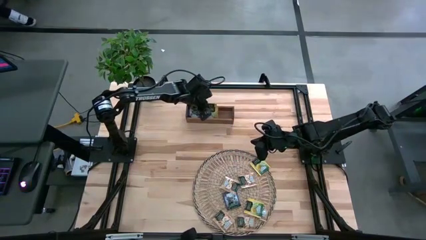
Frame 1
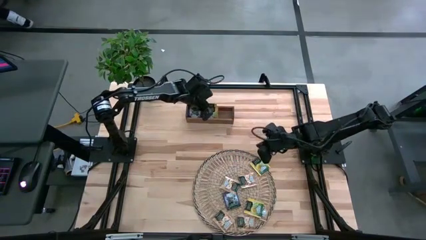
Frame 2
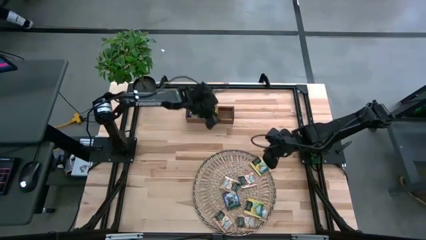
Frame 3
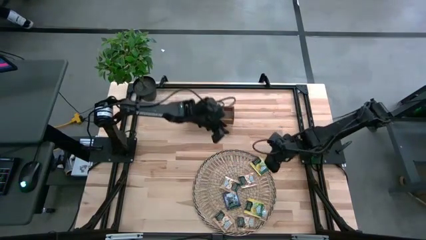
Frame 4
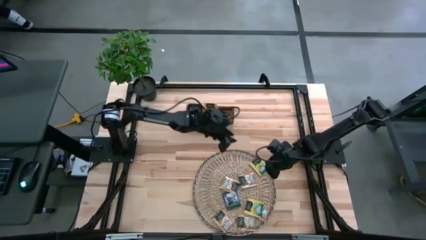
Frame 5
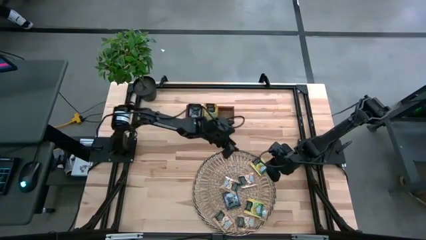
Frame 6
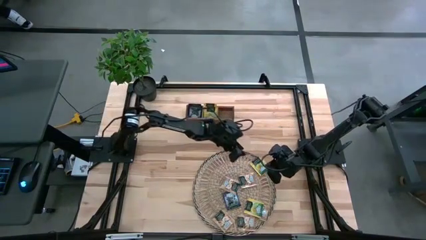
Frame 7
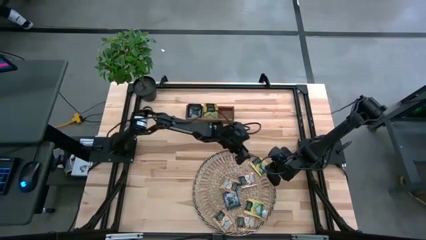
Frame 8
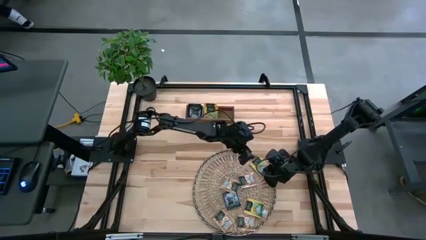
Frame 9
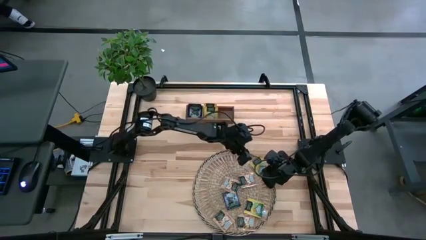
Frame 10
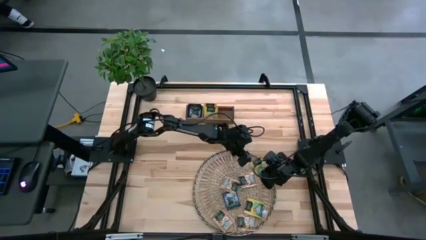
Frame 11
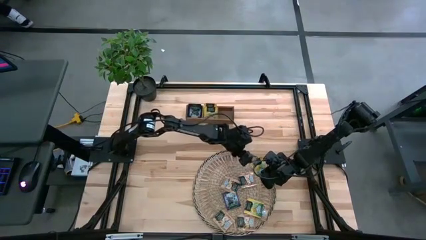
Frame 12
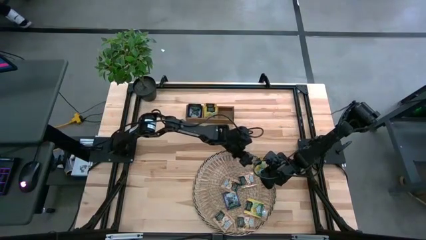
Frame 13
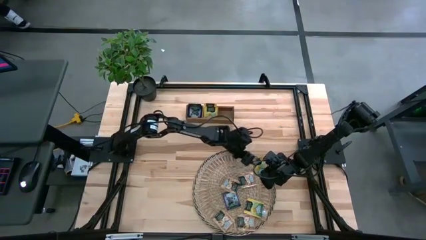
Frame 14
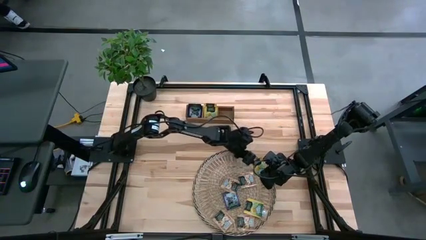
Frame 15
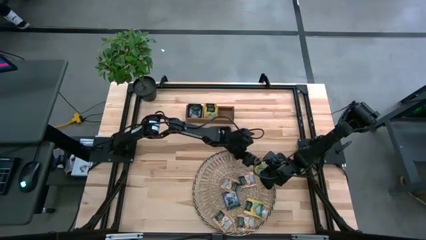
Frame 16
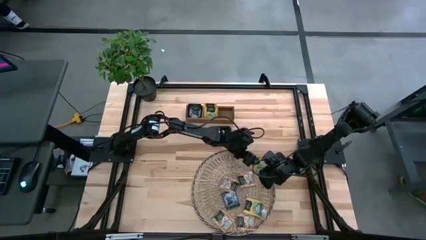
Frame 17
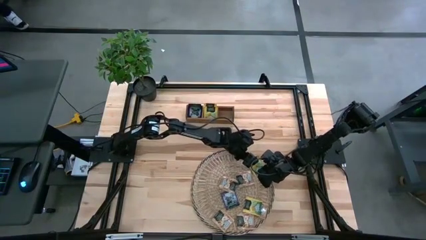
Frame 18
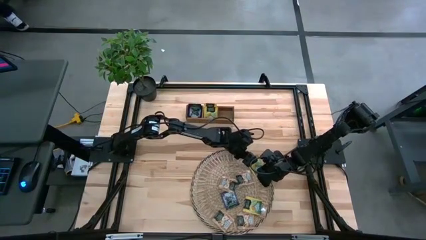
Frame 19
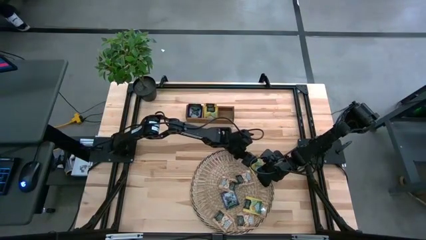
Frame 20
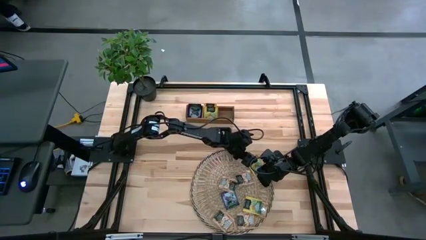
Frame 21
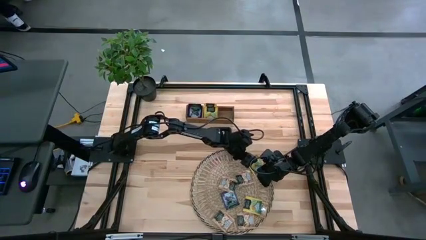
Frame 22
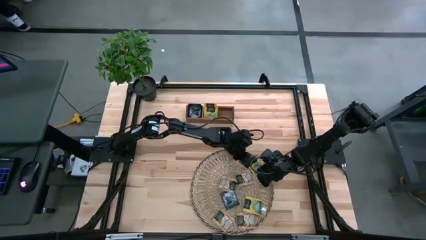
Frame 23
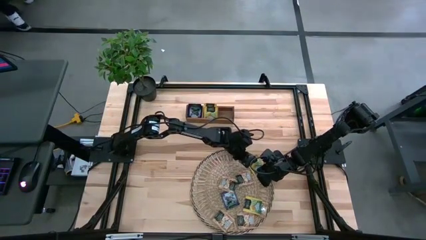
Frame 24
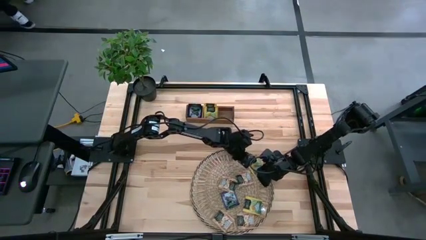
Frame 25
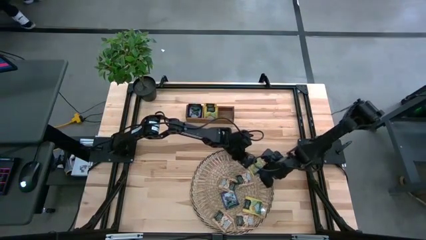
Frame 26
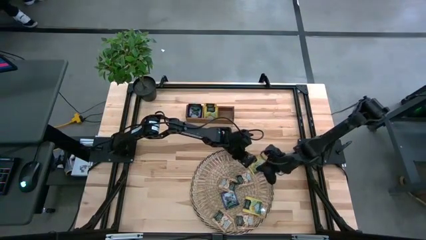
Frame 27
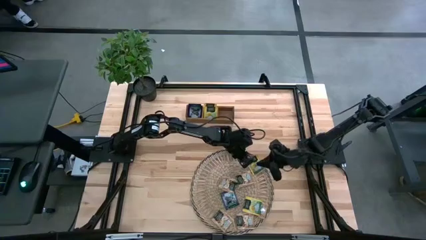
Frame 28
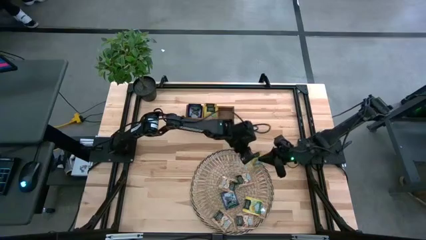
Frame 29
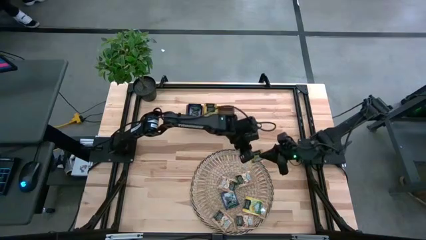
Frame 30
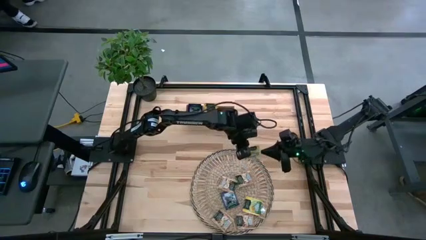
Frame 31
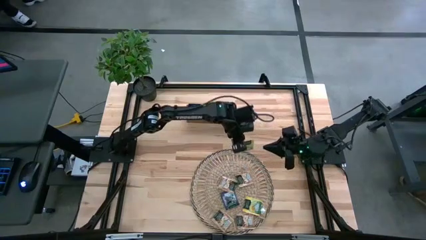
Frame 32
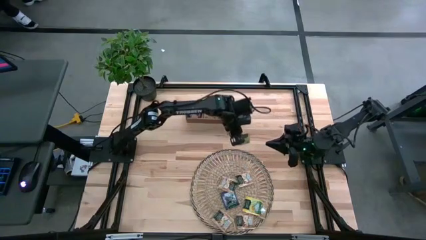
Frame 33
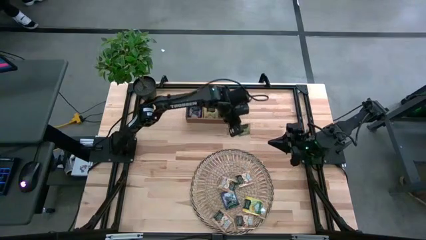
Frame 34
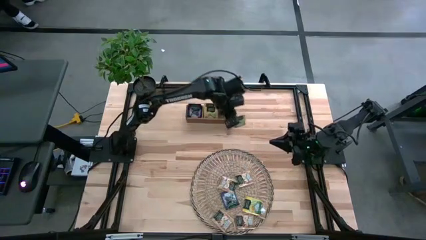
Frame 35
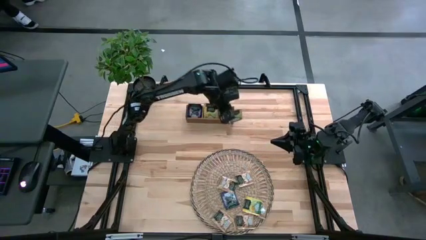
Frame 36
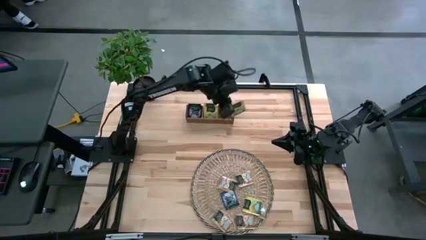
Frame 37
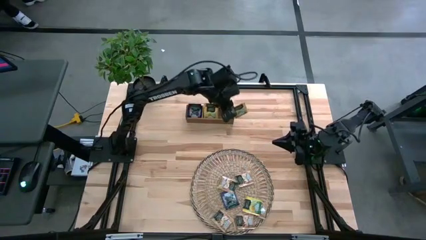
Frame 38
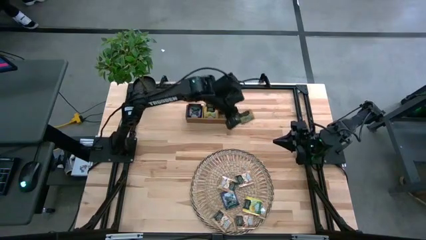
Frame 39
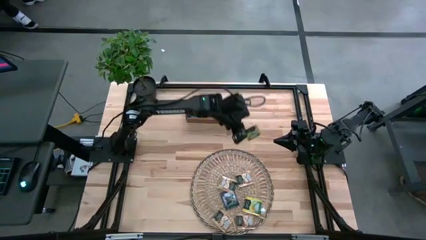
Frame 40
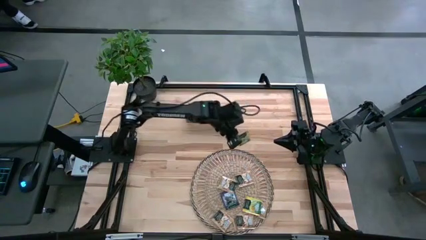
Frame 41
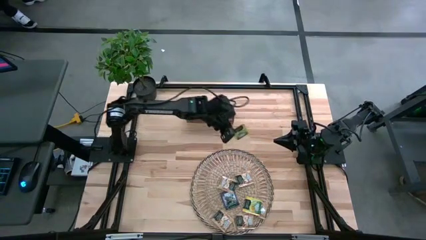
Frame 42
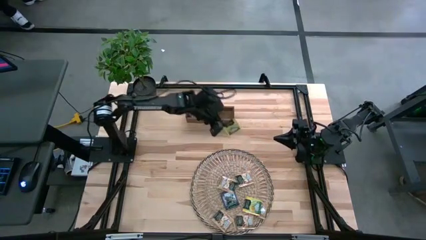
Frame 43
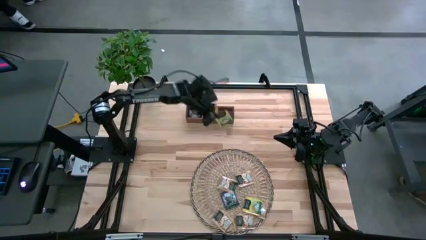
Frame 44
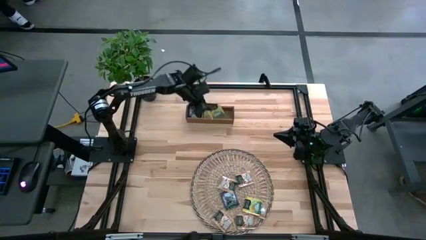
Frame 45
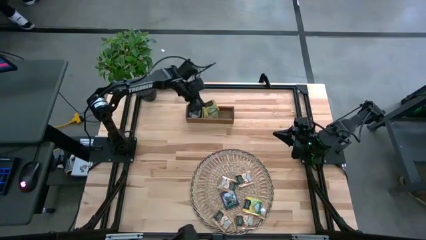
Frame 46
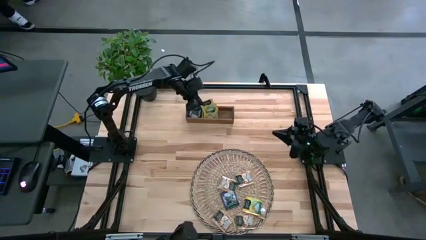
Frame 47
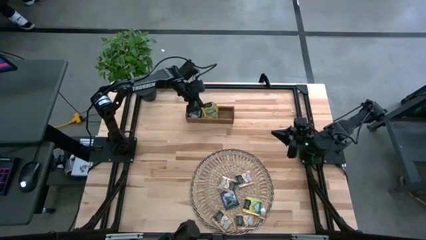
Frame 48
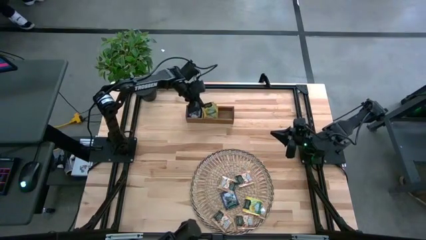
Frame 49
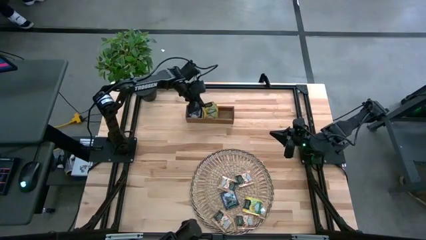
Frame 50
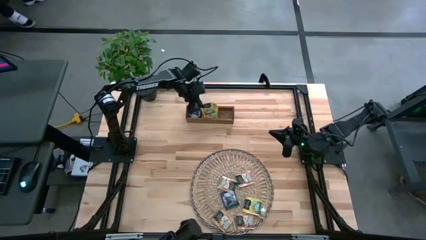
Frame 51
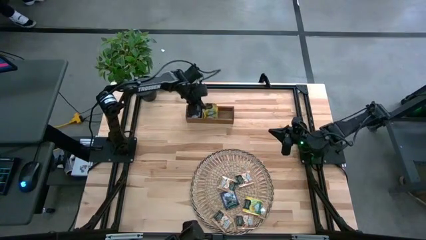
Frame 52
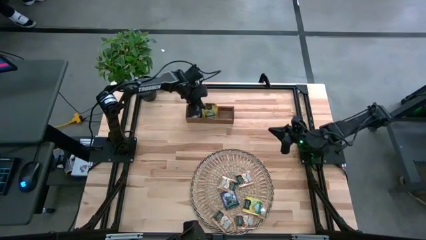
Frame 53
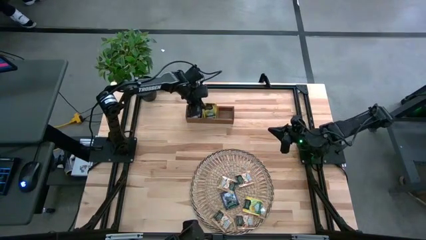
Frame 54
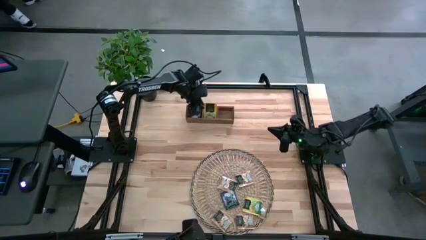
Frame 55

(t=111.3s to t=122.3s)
Task: Pick & Place Tea
Put the yellow tea bag in the middle section of the wooden organizer

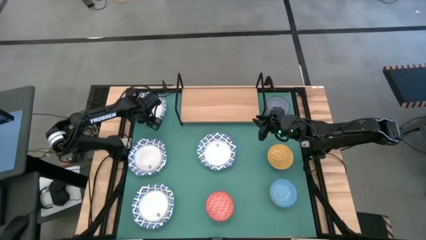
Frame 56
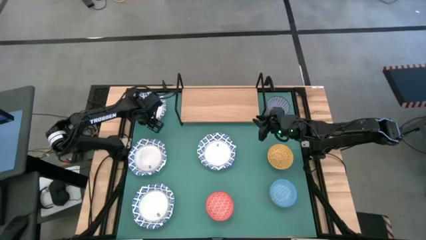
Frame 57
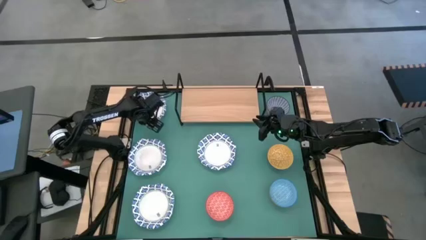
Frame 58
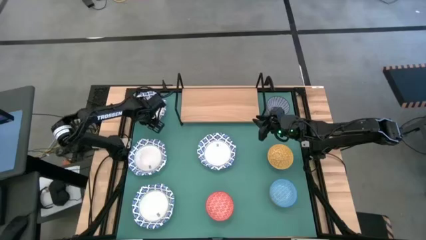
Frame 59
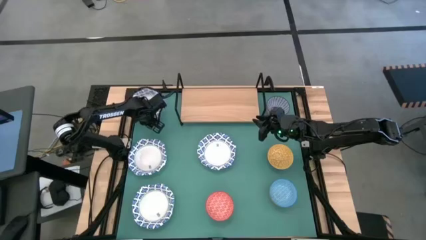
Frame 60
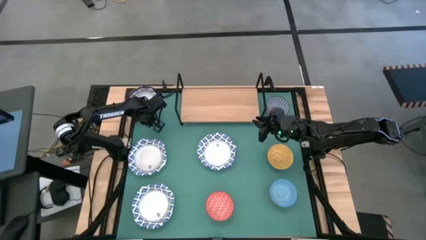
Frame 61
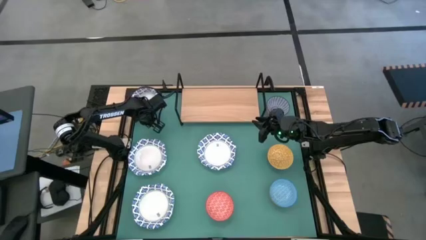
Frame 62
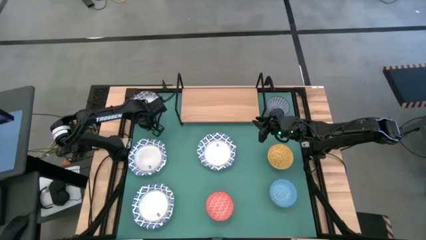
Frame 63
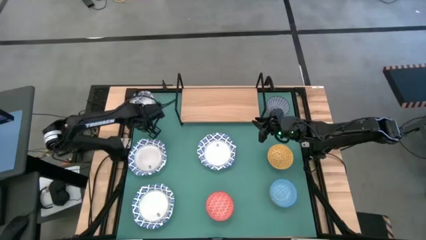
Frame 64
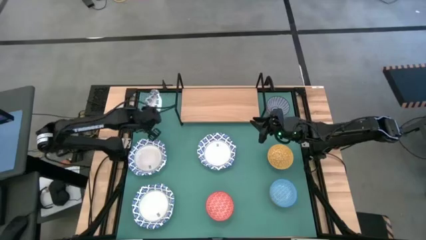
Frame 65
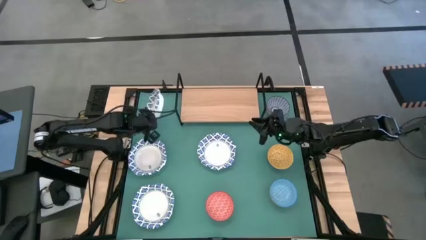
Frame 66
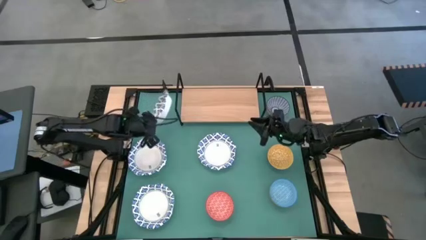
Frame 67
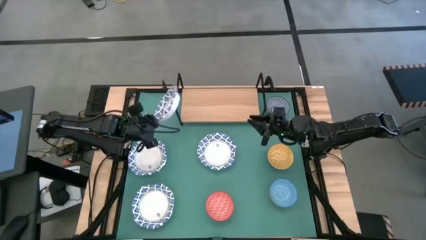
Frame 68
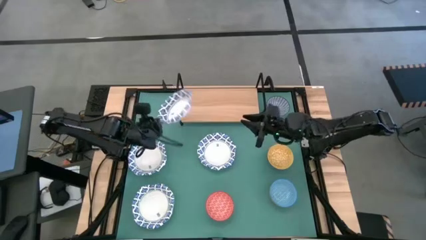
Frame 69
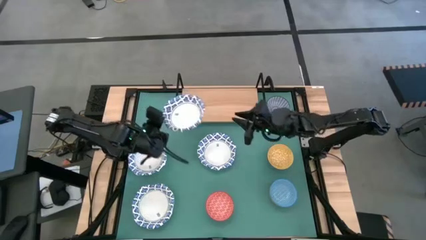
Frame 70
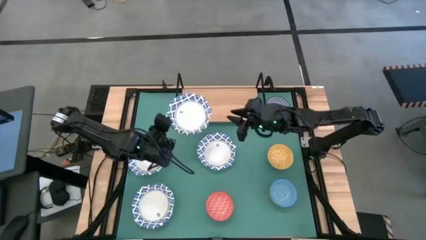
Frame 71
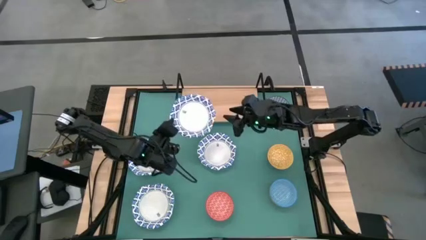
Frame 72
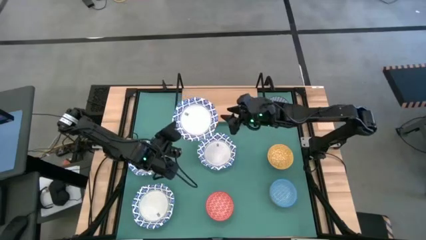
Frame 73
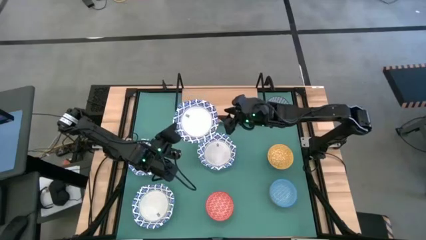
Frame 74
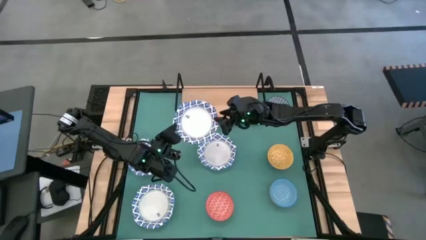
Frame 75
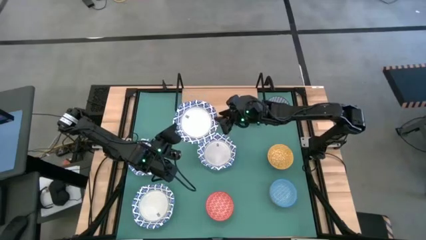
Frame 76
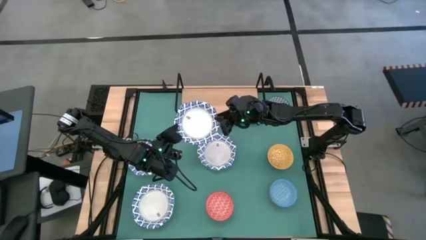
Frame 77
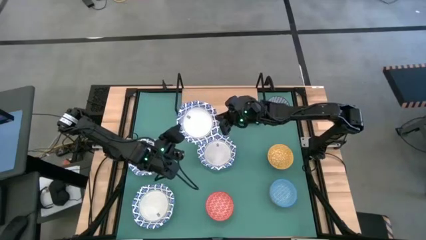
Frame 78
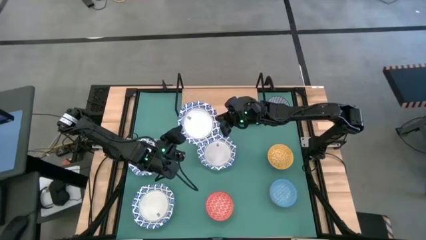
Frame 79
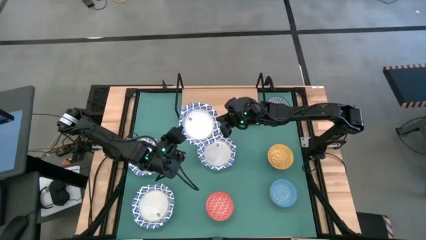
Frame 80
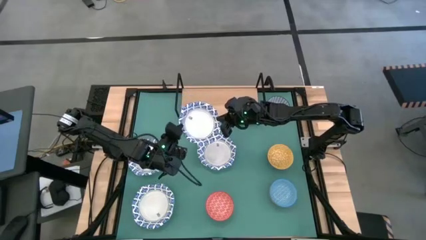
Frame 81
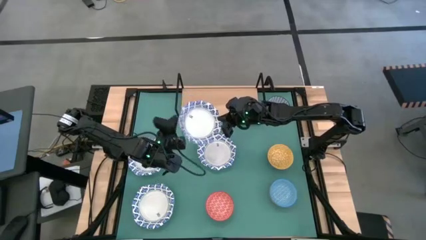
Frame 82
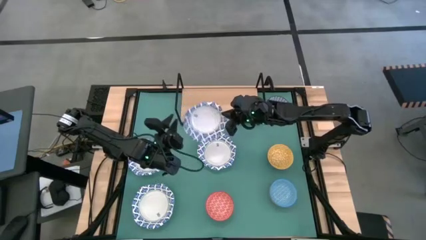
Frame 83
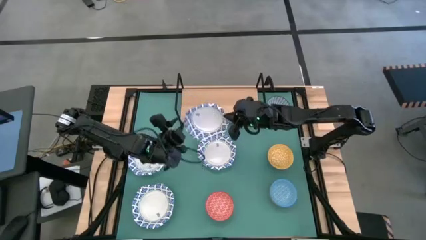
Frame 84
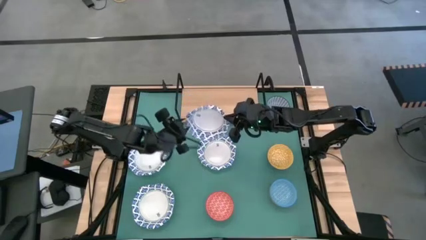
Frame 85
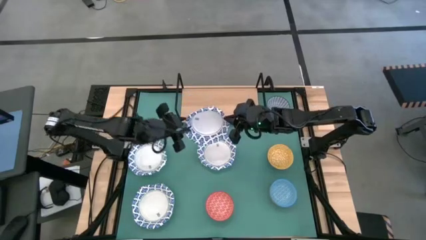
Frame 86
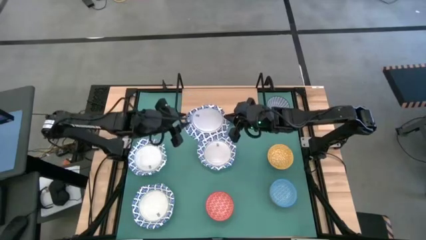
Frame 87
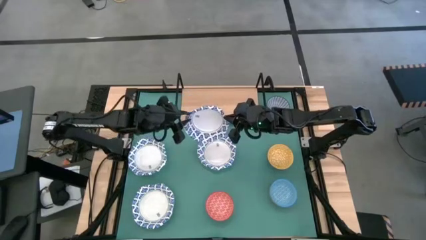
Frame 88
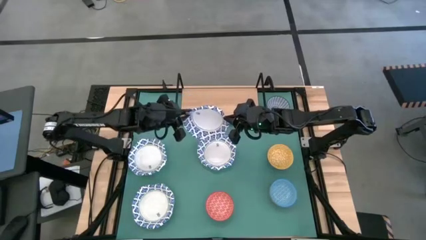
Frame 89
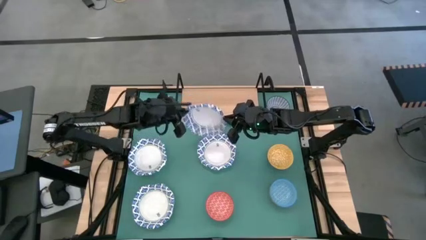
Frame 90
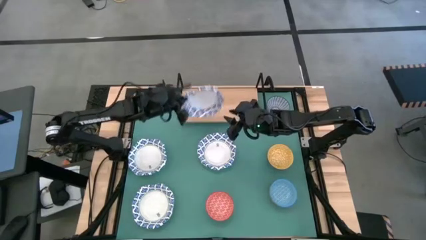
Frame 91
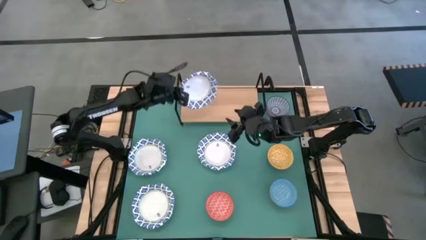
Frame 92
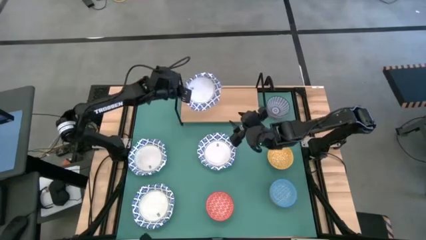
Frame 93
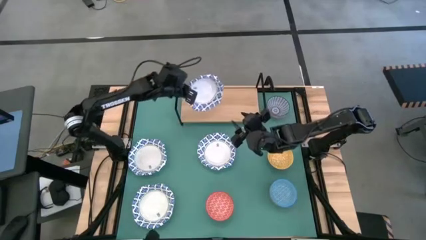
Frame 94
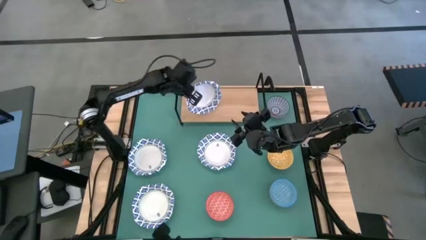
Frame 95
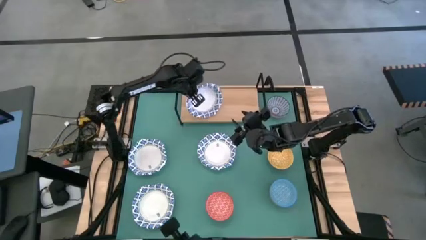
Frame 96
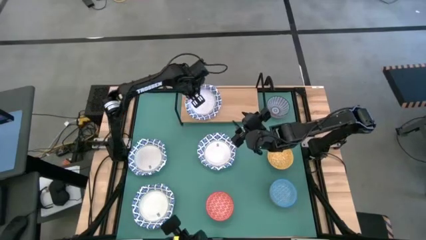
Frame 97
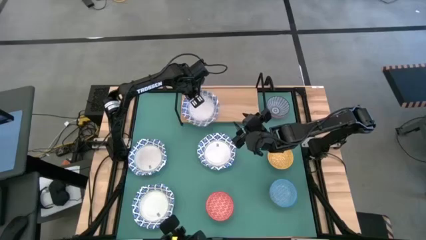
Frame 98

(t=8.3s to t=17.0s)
Task: Place and stack bowls onto a shelf
Put the white patterned bowl on the shelf
